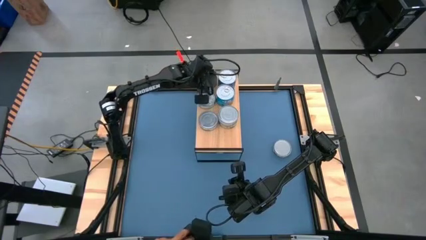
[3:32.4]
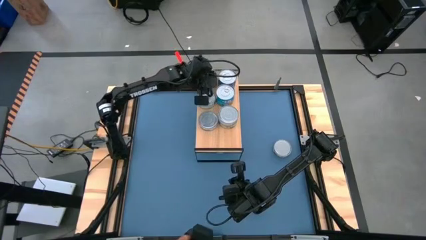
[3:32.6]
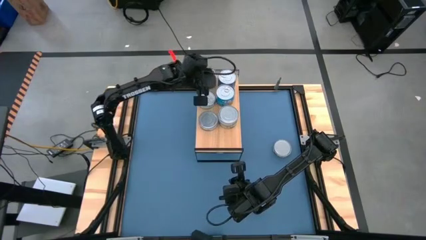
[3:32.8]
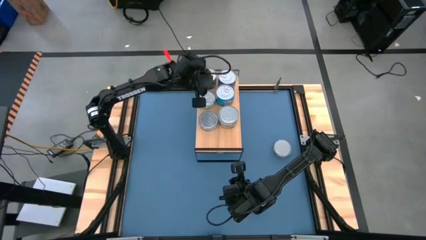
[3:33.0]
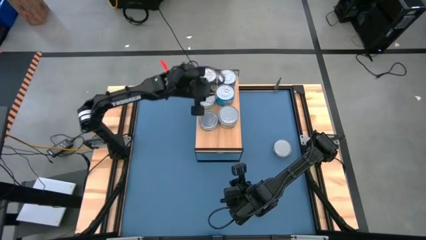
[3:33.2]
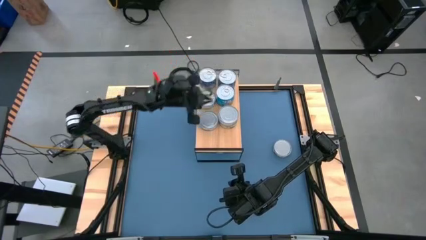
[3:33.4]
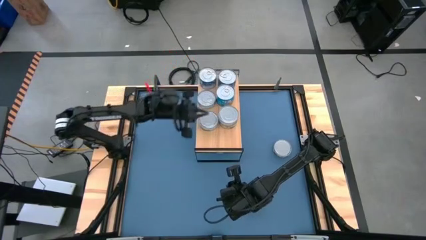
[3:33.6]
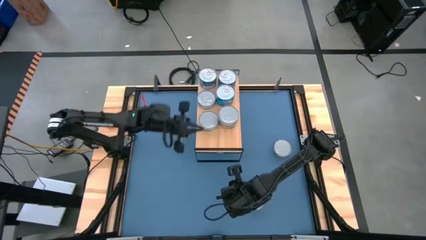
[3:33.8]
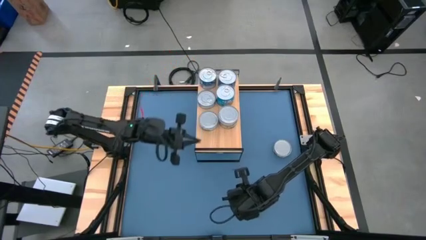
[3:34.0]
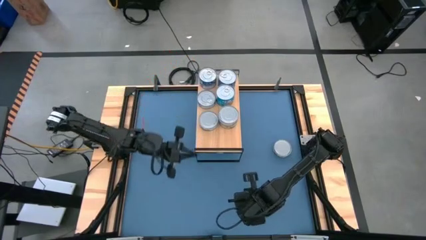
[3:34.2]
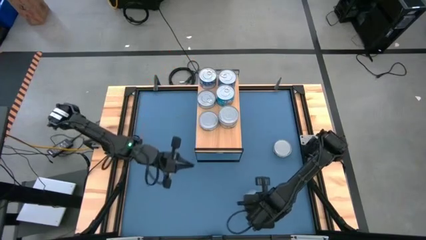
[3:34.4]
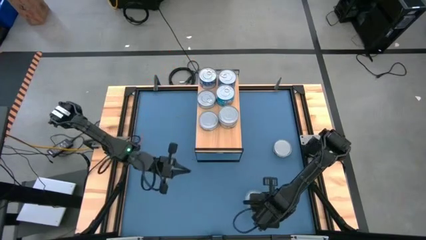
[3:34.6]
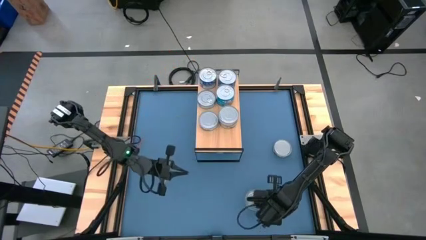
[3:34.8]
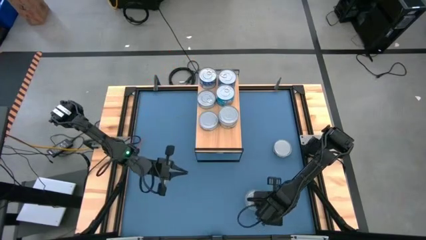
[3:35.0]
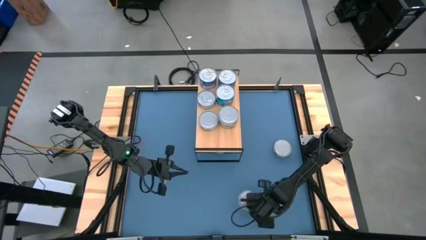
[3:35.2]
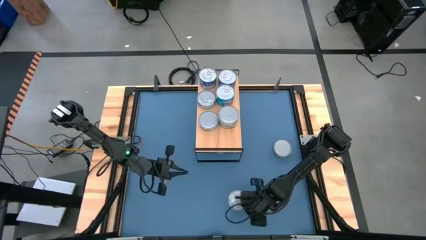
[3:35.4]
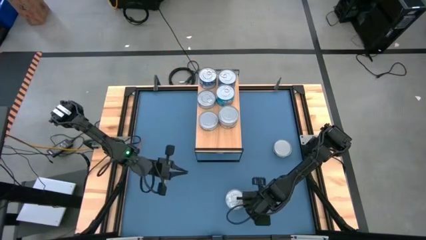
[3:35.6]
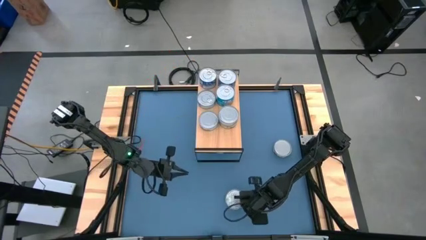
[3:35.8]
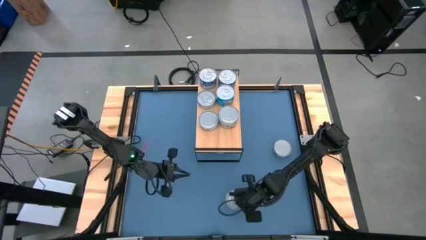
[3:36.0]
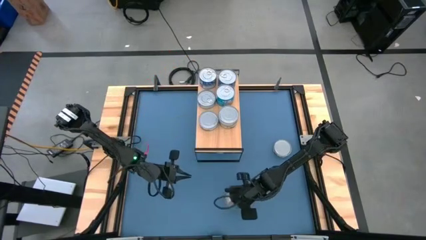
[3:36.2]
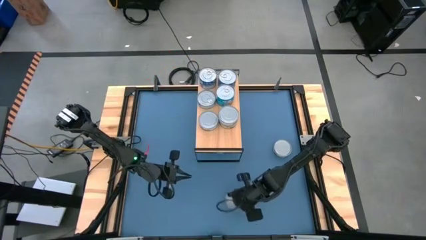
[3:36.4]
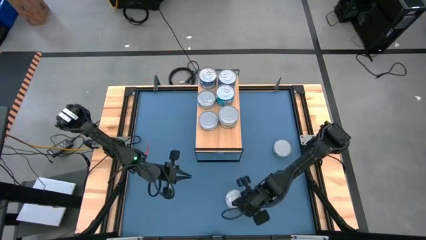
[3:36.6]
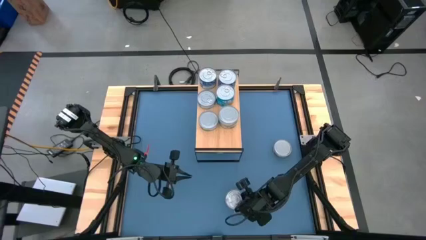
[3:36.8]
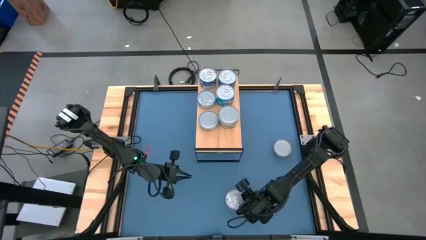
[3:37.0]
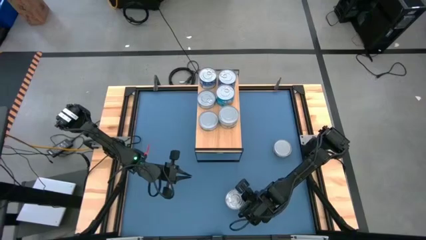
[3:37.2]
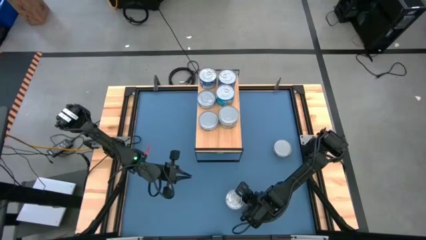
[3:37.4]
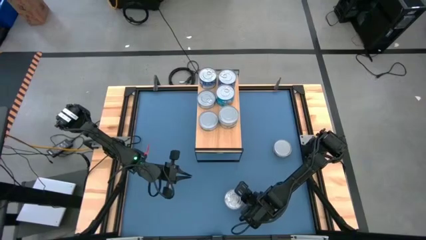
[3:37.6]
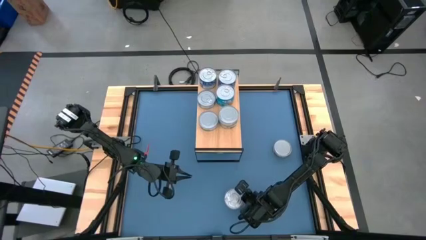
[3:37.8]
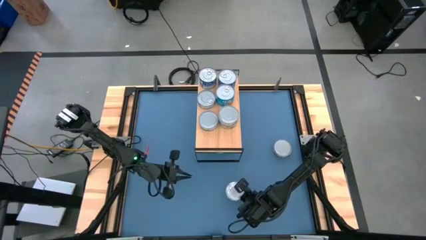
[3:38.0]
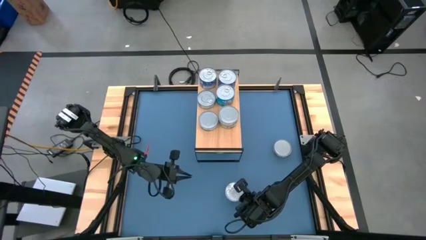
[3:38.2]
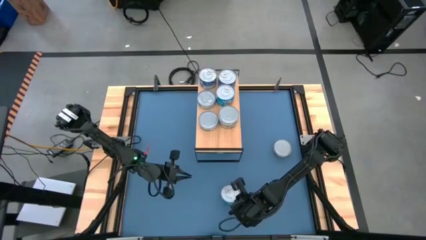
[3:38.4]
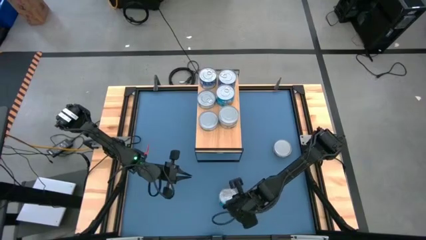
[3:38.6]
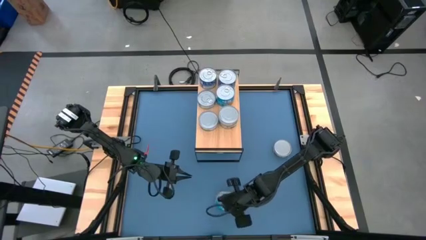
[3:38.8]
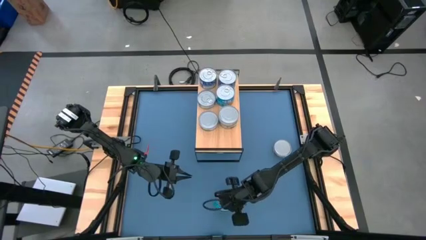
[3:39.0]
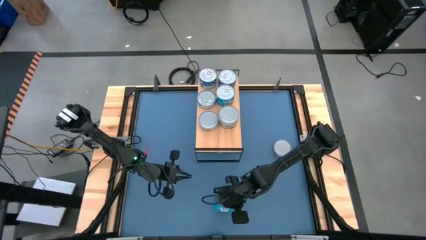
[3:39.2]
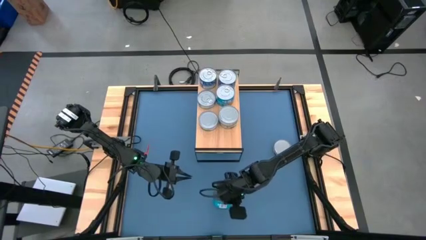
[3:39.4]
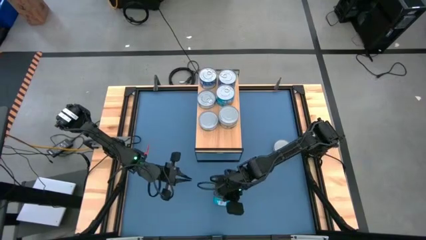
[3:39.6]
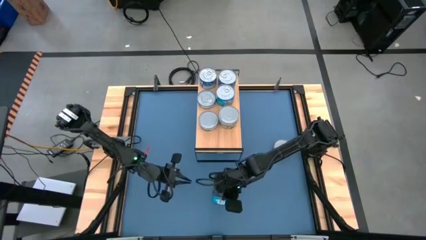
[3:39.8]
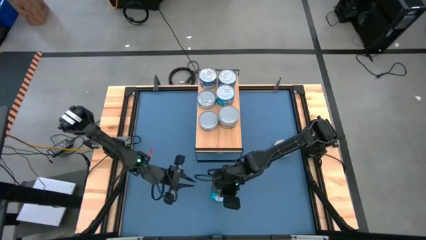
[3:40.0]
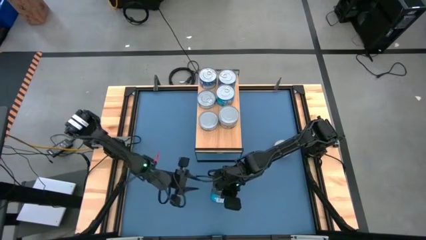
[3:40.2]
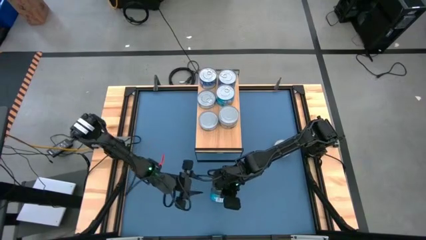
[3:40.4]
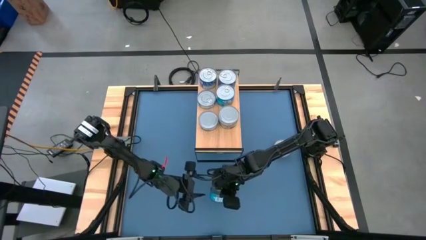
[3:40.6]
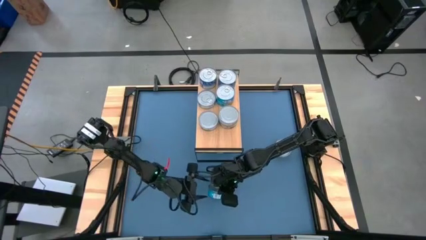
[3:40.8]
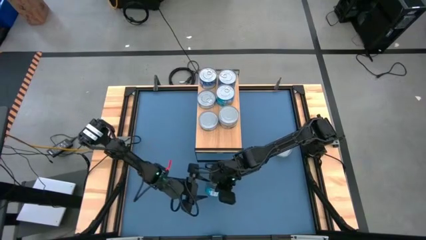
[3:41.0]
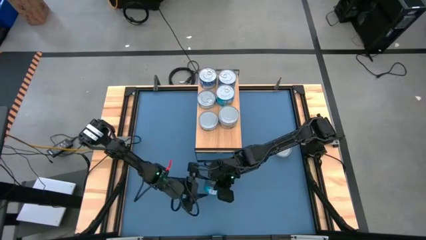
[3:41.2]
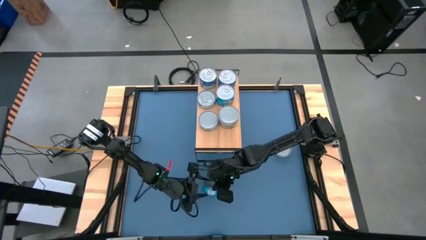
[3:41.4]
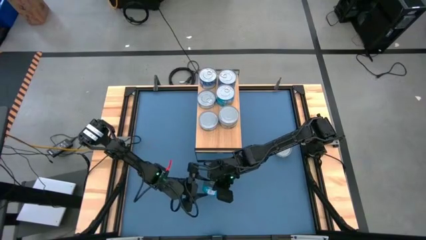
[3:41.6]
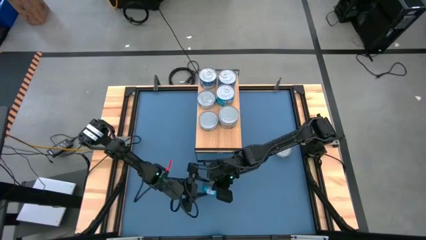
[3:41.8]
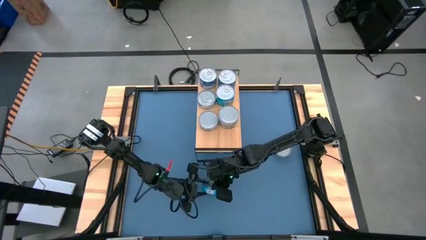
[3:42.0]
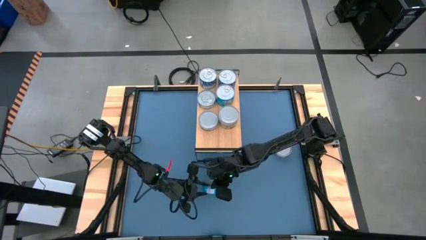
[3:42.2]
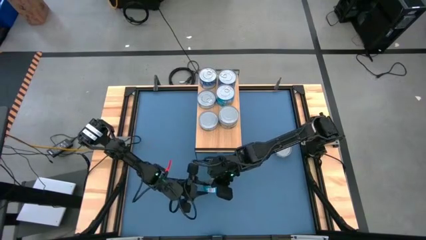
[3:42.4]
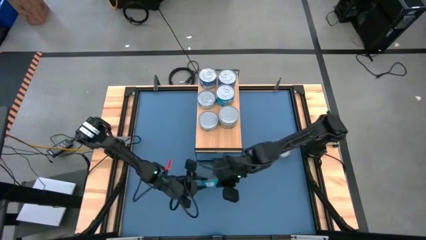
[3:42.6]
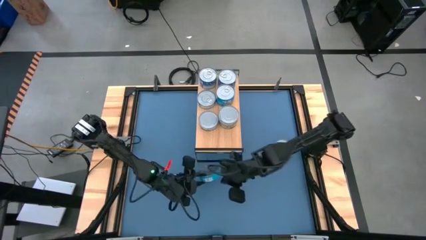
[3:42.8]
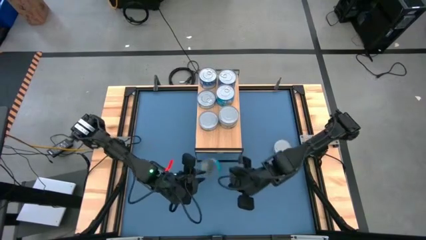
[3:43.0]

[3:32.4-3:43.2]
Task: Stack canned seafood by type on shelf
Stack the yellow-blue tuna can on top of the other yellow-blue tuna can on the shelf

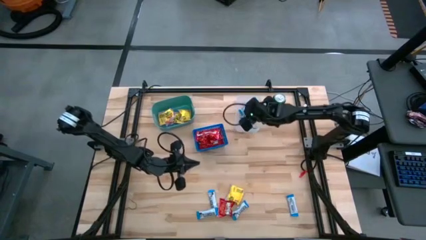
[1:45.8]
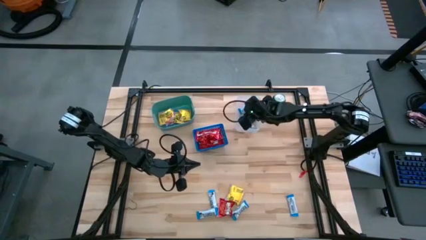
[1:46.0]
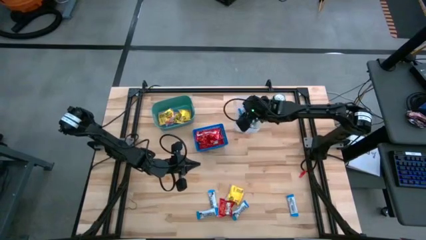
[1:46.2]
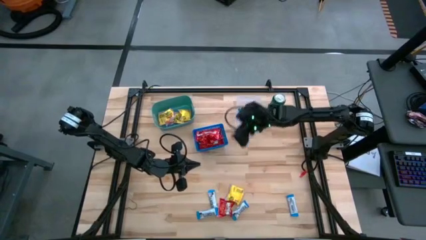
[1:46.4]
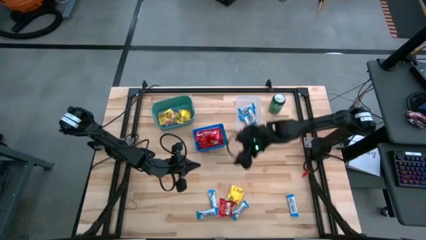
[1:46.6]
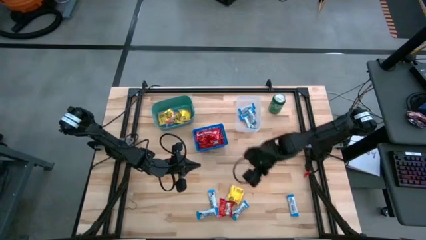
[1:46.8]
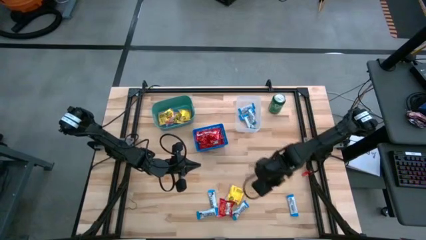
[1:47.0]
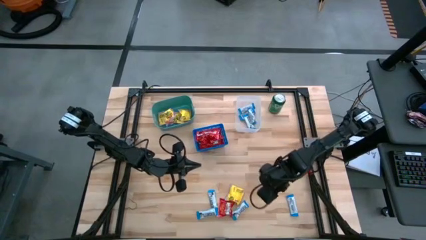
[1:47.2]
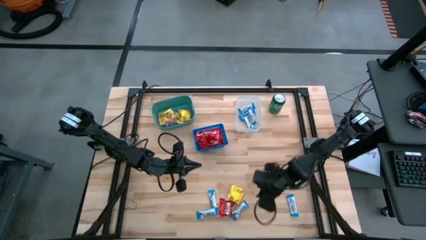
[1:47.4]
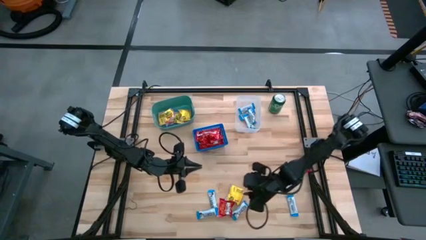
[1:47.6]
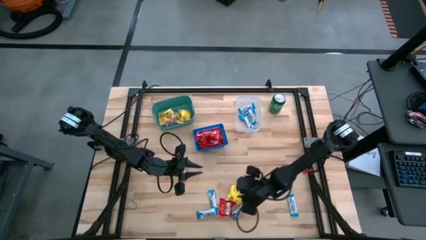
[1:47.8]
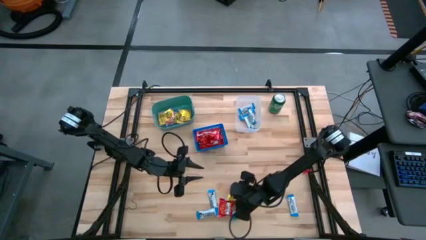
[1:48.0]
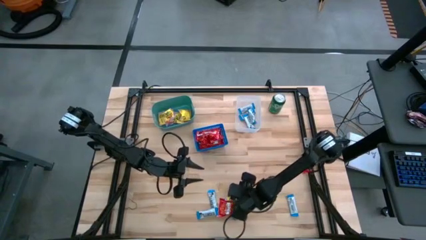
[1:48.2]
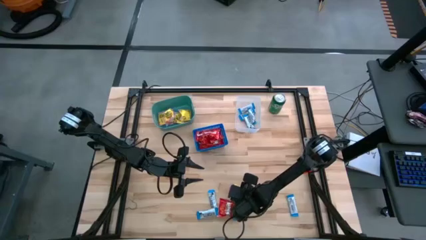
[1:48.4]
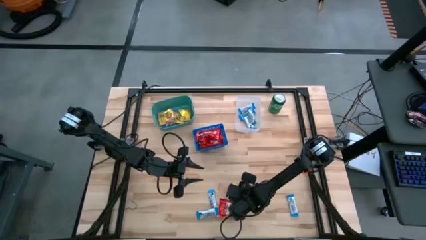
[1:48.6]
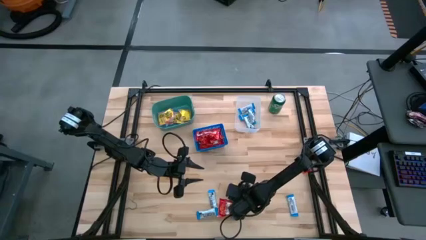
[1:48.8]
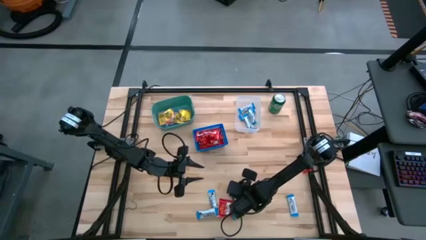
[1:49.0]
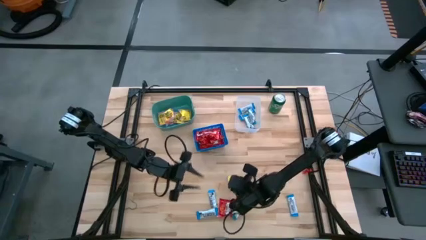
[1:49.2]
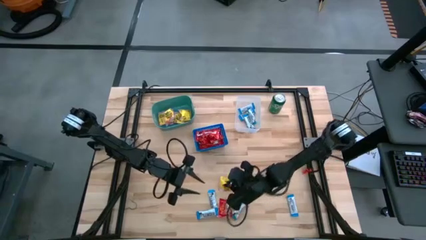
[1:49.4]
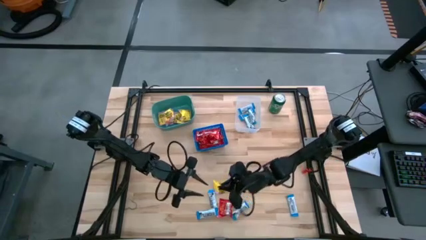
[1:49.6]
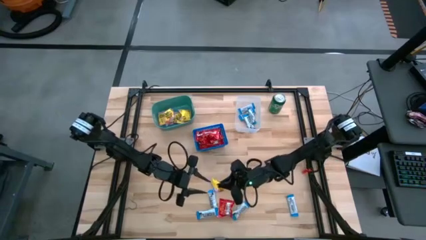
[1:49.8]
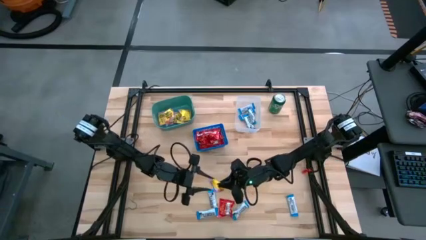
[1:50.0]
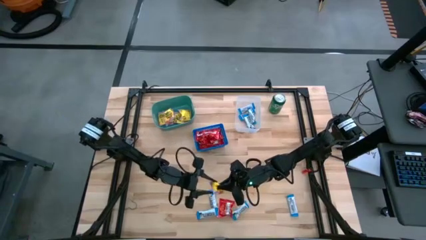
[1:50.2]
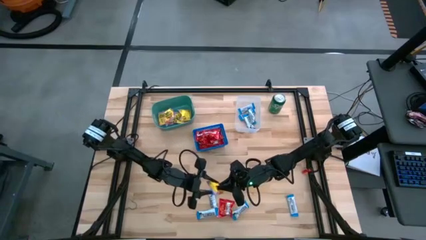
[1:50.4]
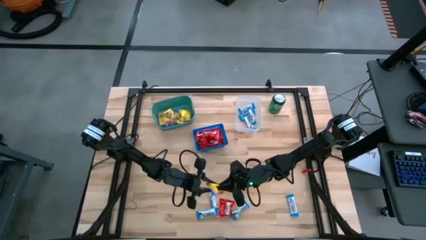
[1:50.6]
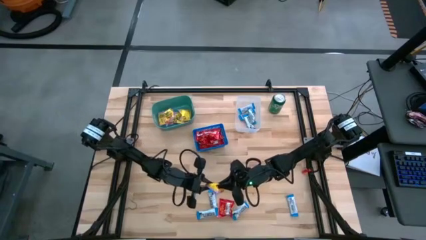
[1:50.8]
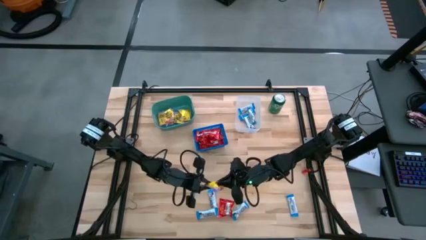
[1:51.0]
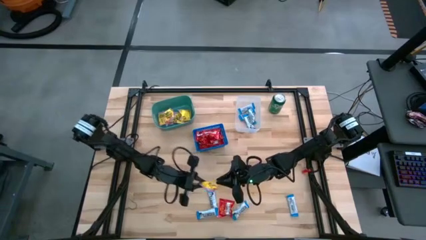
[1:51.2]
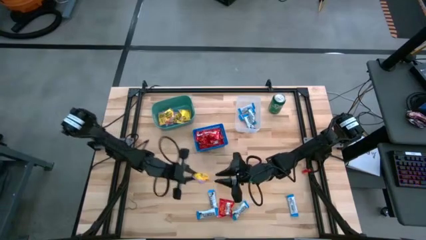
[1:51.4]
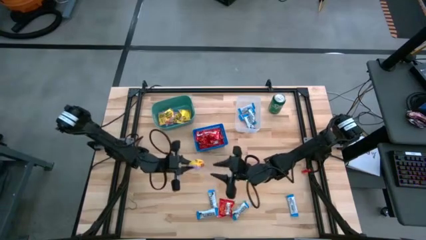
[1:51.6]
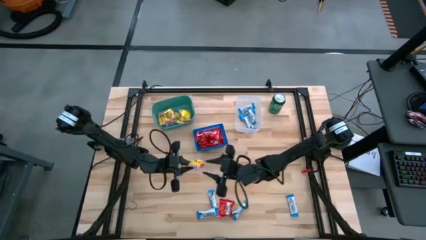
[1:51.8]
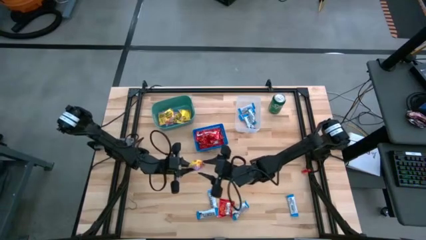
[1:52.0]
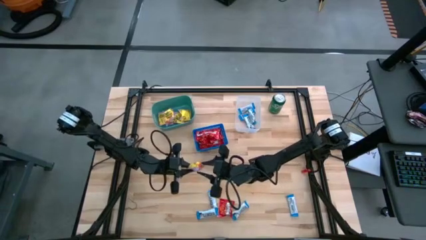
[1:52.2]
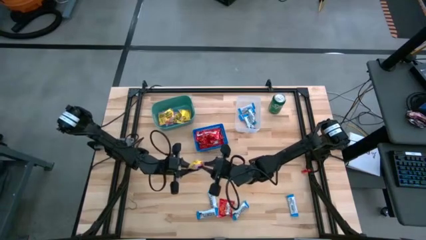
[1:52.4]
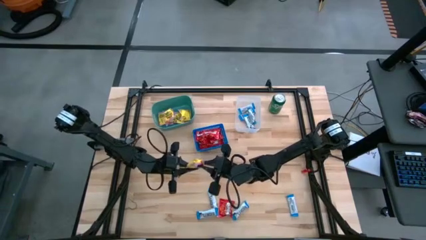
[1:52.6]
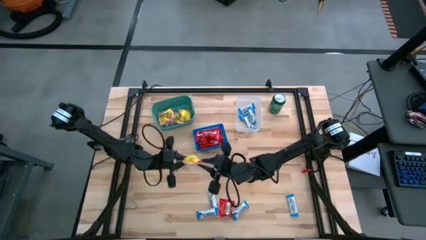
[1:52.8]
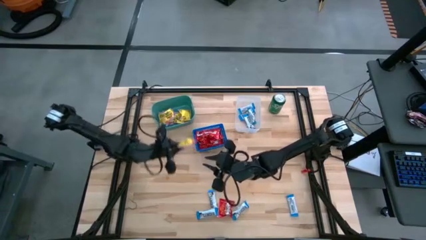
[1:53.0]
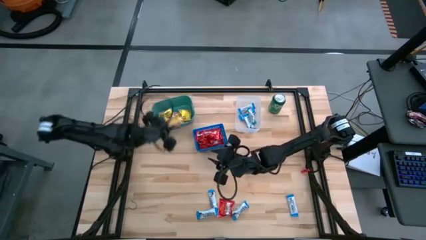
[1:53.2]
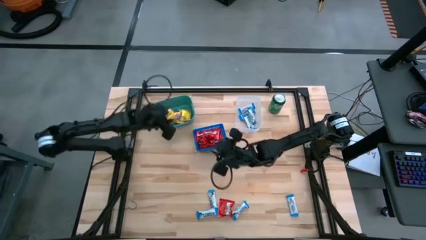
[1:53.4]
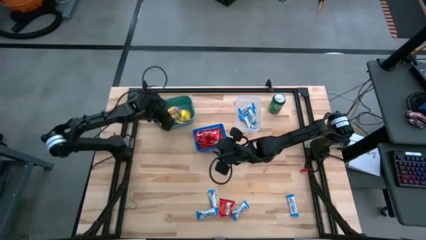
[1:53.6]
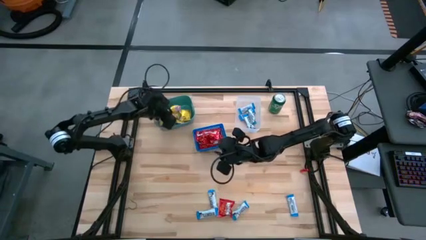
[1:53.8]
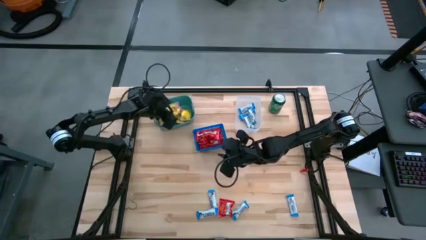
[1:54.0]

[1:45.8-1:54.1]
Task: Sort candy
Put the sour patch candy into the blue green bin
